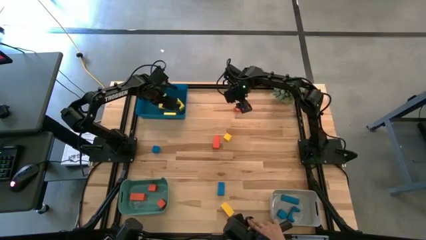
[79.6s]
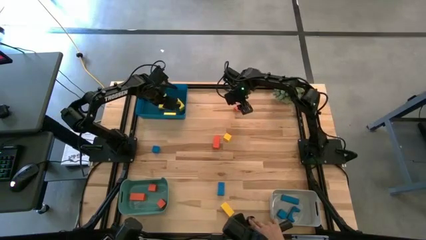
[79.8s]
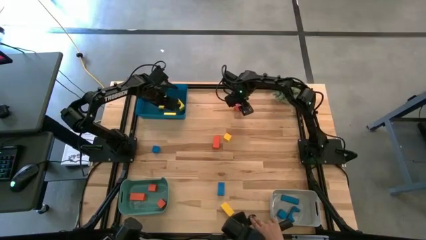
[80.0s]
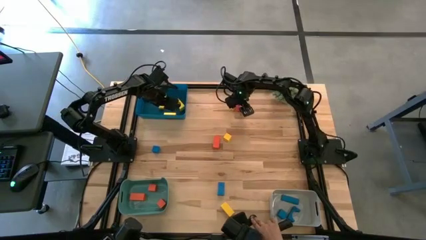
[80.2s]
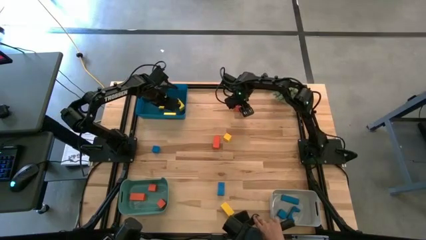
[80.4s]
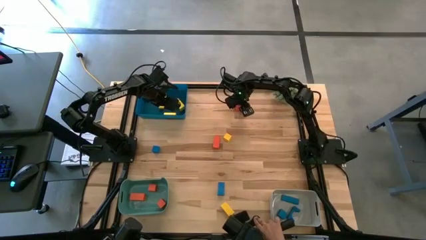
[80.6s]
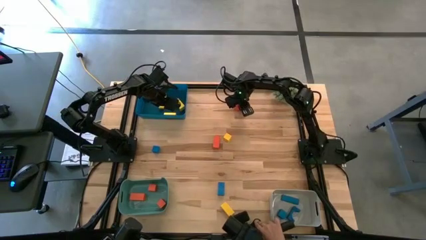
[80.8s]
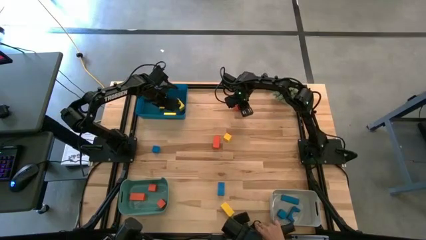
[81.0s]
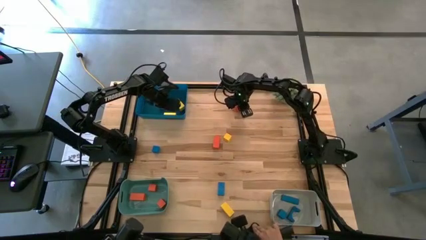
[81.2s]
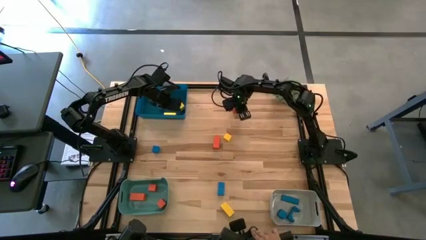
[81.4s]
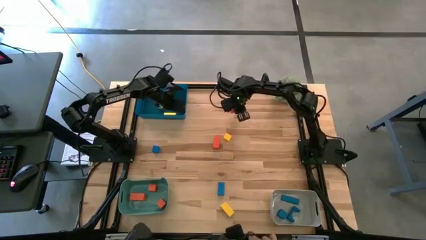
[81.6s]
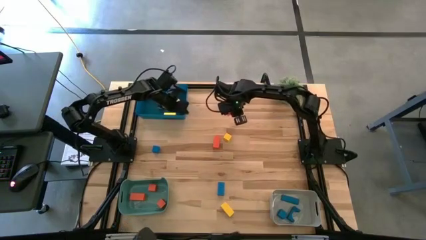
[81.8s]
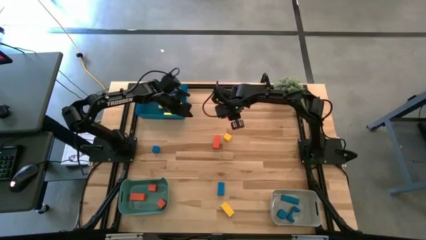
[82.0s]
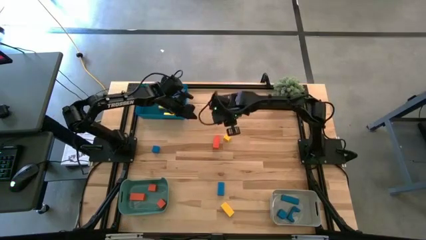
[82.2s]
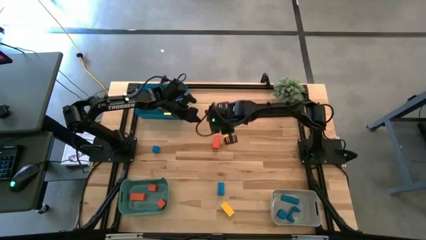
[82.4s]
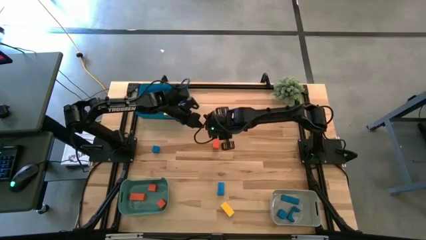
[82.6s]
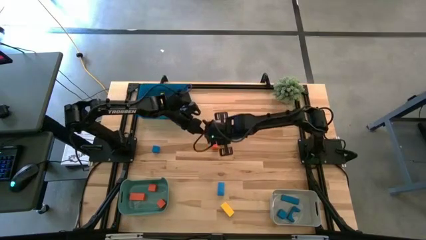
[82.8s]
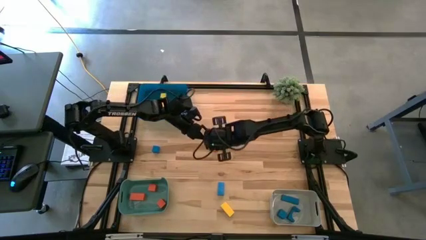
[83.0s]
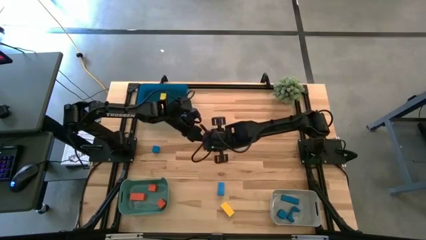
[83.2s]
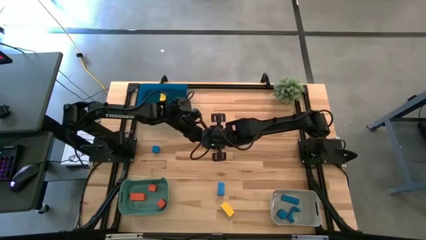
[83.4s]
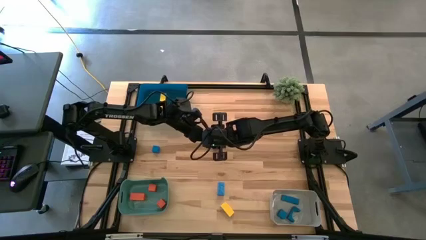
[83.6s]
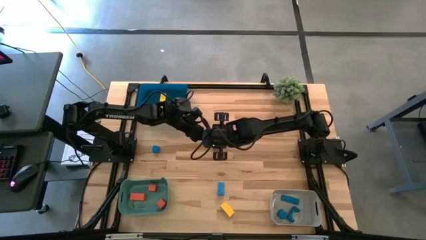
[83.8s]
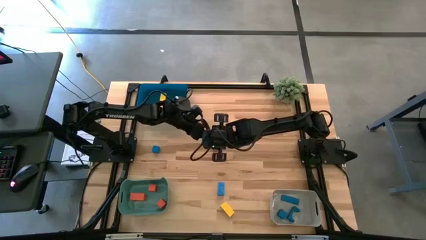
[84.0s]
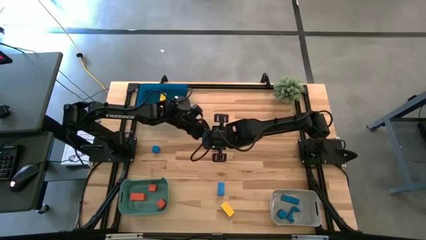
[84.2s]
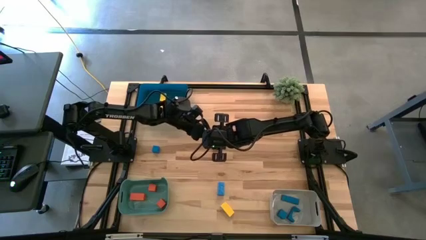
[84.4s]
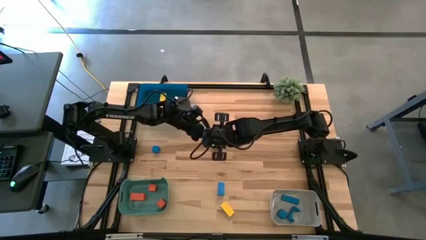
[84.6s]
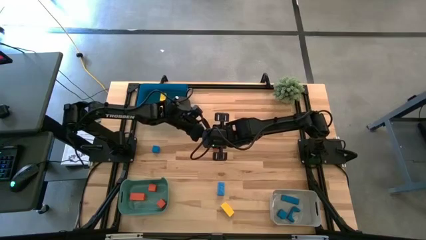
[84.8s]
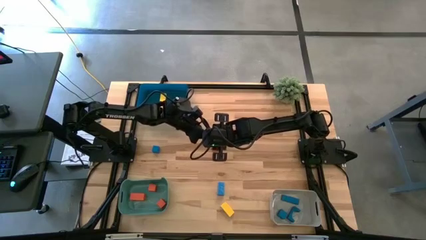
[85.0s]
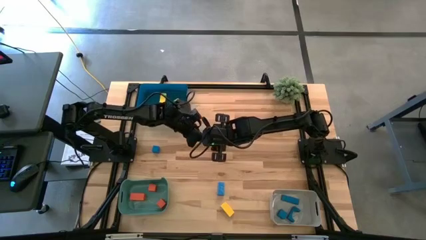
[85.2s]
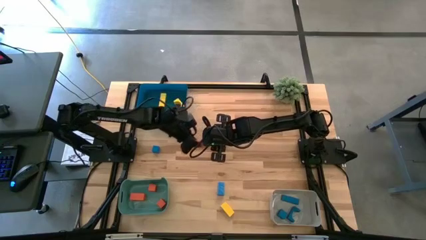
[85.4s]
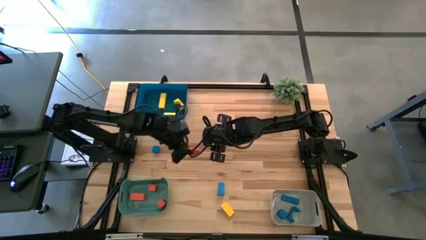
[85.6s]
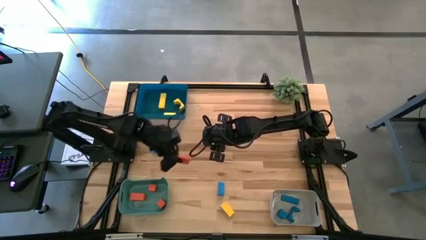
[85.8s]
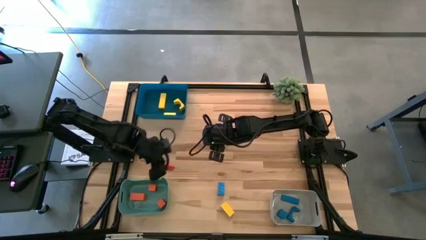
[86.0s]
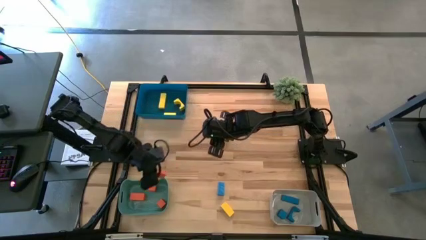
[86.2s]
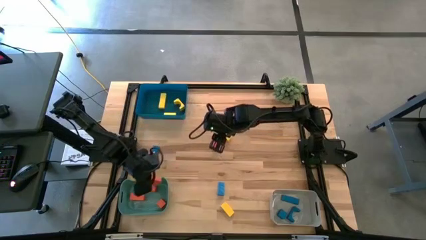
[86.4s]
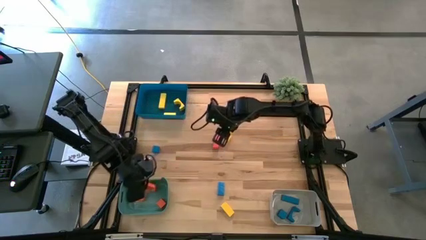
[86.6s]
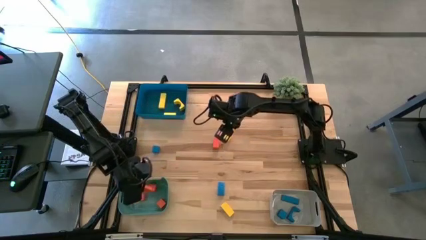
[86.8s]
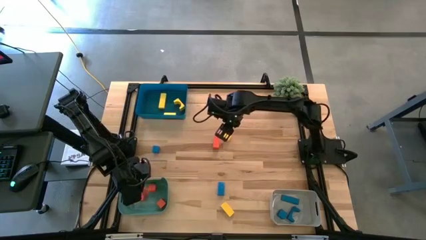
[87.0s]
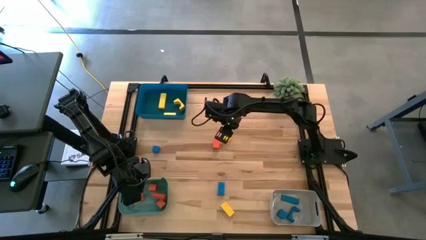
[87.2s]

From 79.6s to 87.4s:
Task: Sort & place blocks by color
Put the top orange block into the green bin

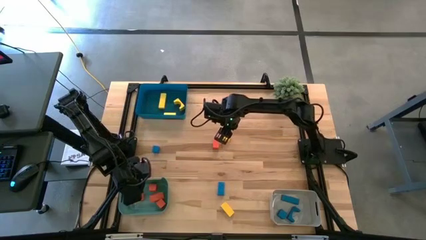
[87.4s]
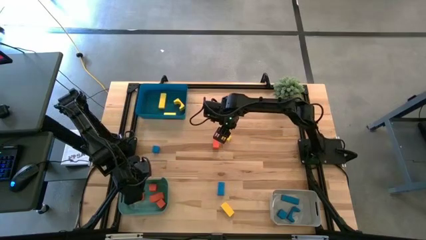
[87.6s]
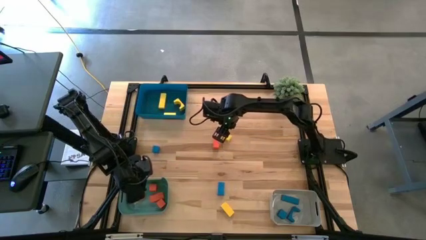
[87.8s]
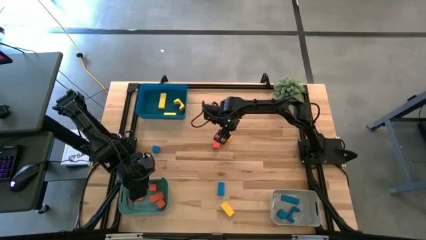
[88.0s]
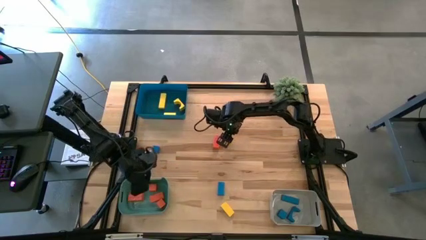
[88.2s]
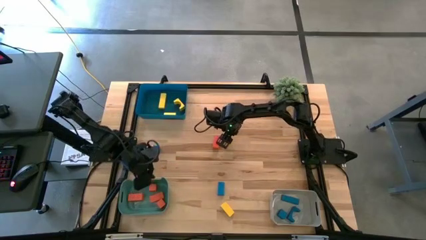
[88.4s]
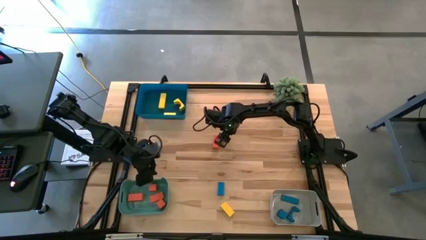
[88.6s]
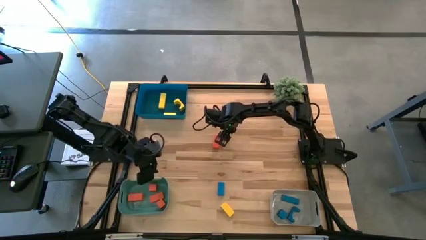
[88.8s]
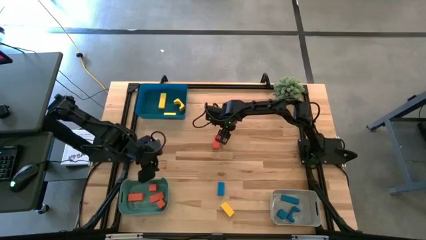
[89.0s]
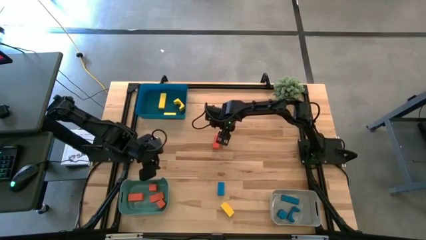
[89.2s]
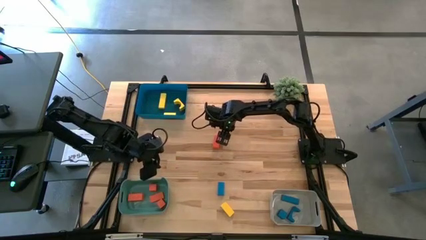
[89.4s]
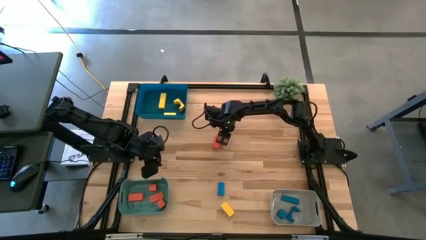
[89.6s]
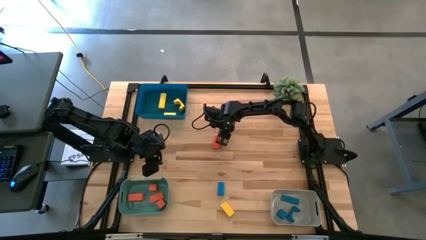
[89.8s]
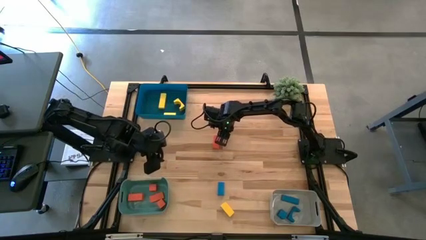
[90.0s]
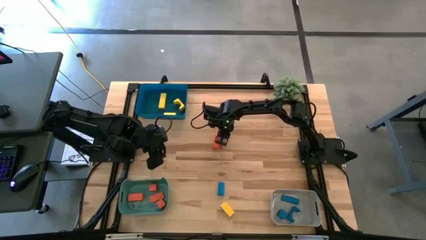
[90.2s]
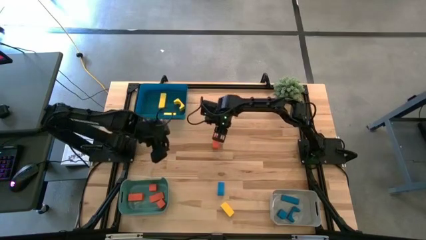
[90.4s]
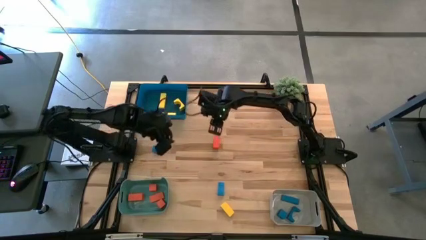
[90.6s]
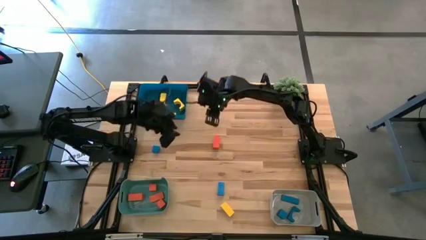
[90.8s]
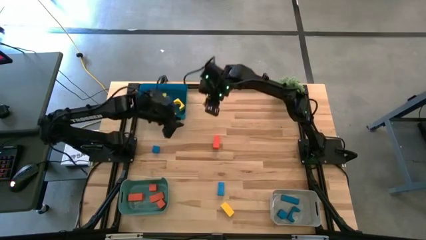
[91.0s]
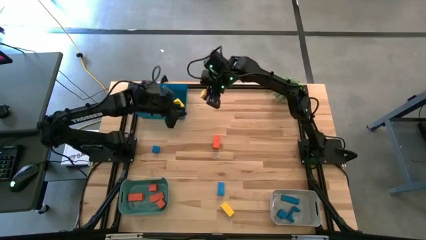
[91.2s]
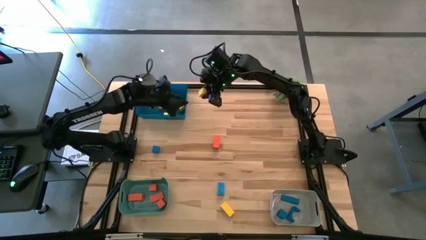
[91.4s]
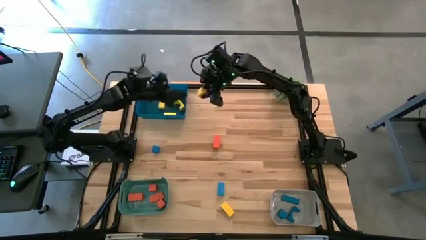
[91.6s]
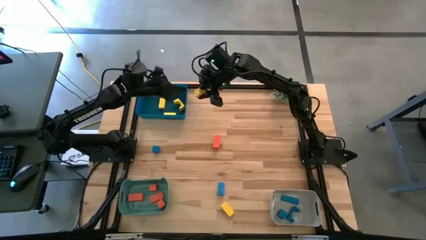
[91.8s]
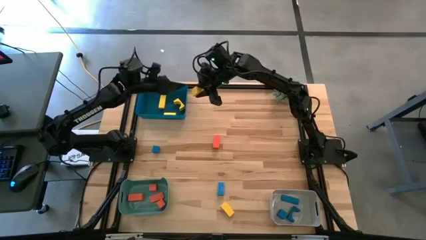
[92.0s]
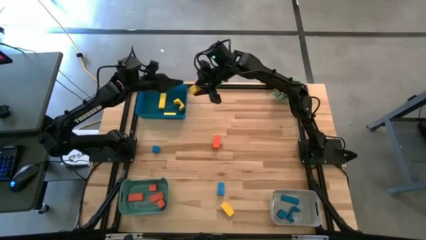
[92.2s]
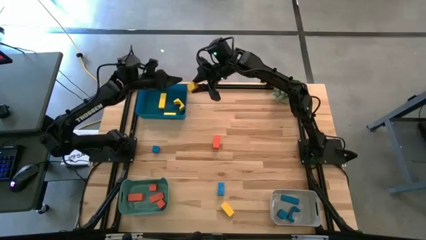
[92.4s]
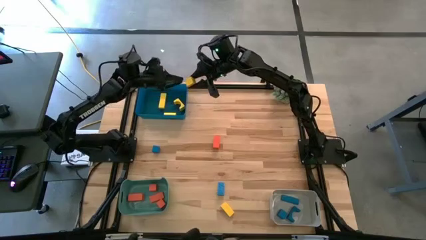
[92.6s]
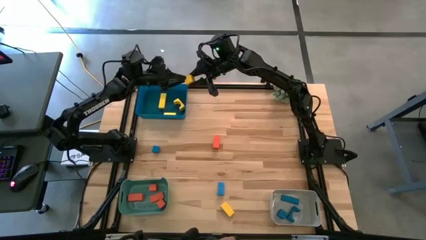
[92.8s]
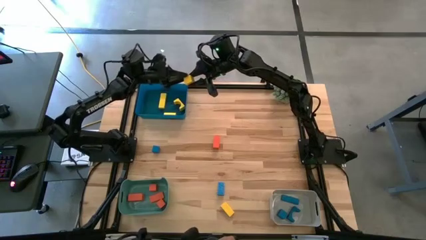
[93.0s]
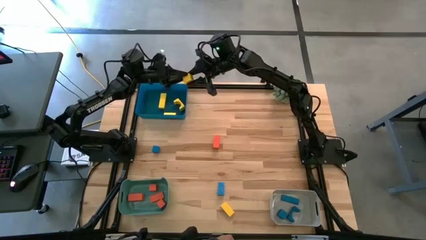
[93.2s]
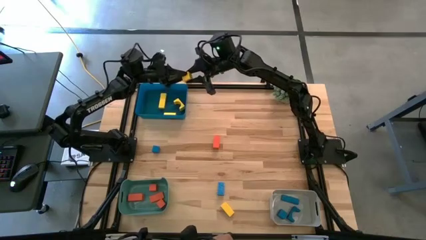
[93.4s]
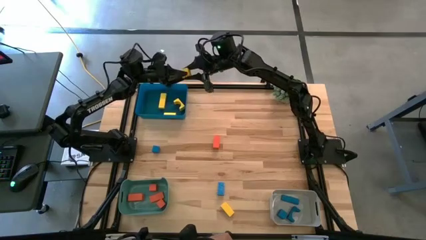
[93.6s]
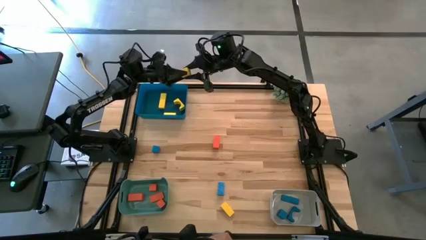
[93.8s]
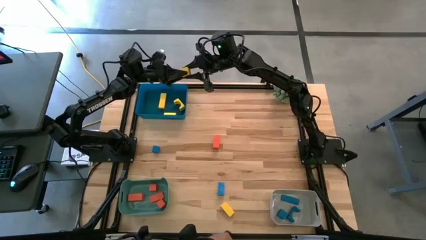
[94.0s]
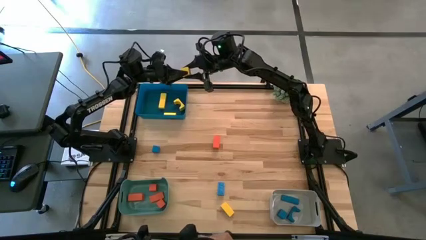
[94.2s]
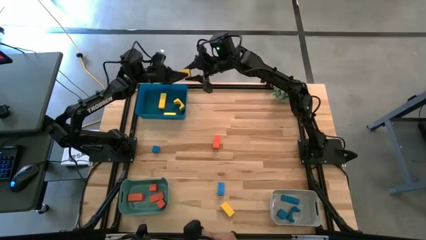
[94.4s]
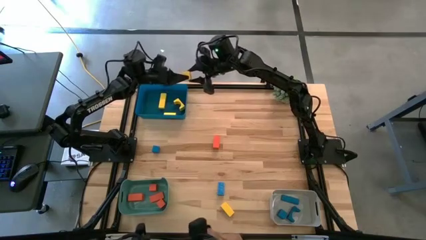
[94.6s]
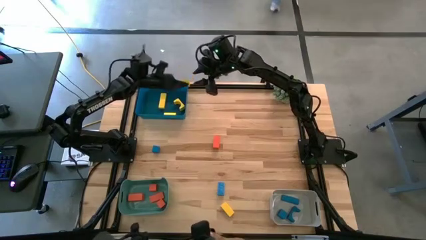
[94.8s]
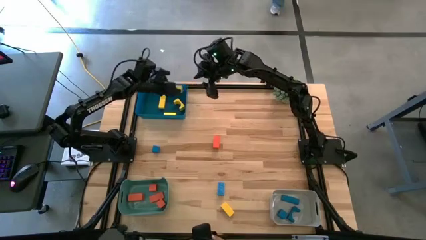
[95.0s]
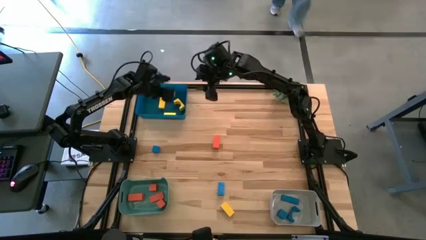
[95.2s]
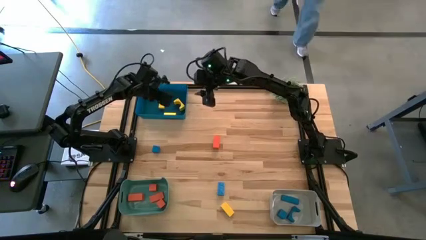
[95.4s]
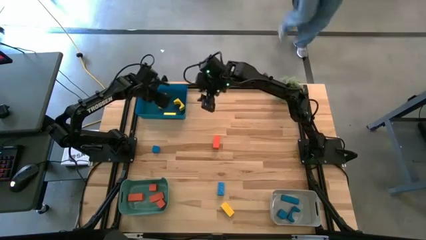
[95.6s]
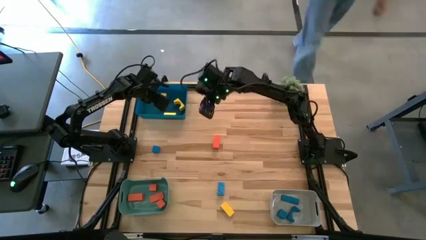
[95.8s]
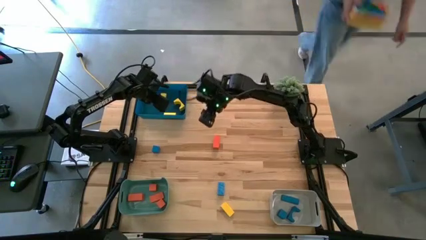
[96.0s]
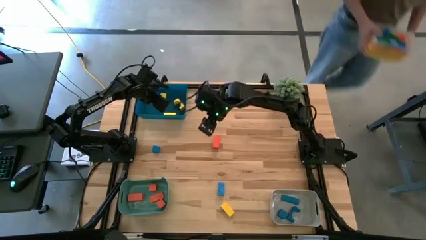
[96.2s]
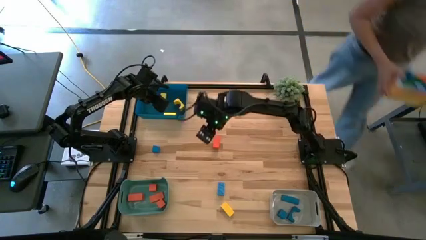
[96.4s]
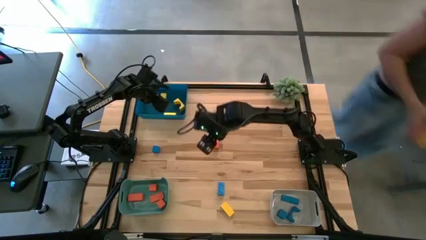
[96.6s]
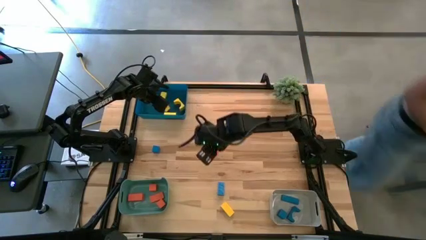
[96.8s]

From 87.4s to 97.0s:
Put the top yellow block into the dark blue bin
